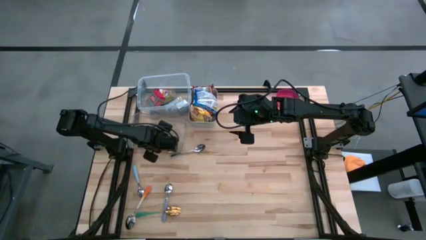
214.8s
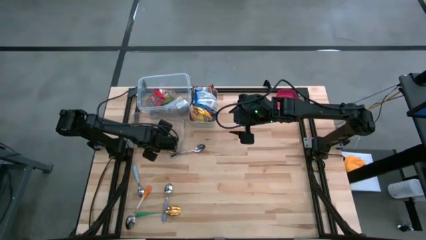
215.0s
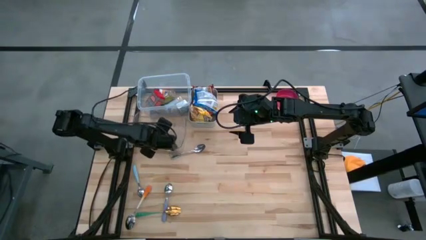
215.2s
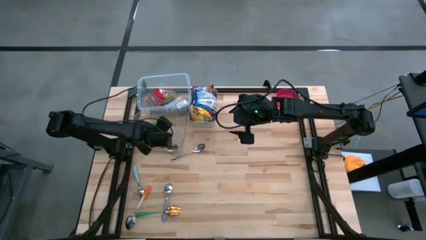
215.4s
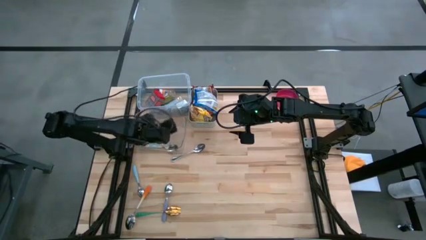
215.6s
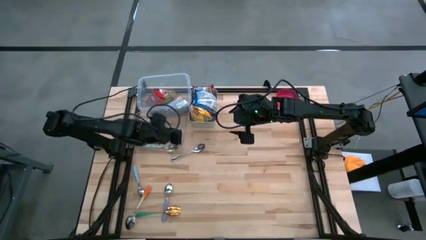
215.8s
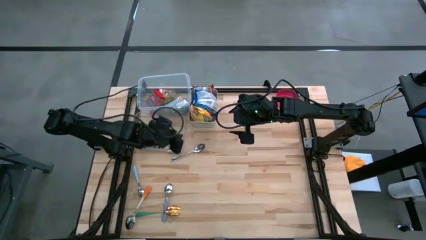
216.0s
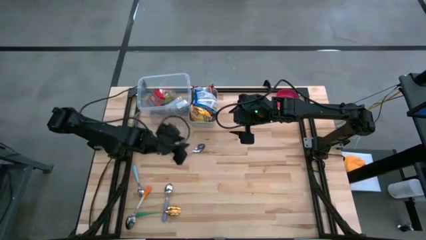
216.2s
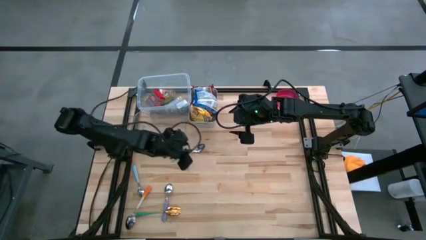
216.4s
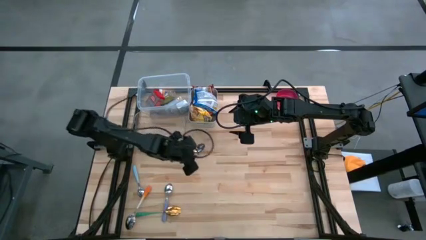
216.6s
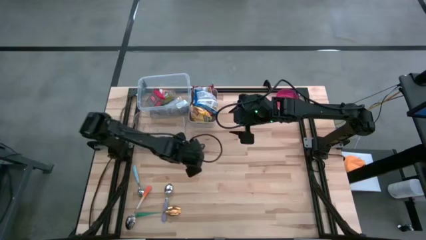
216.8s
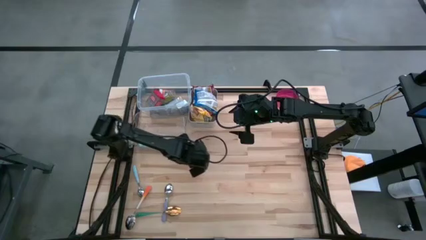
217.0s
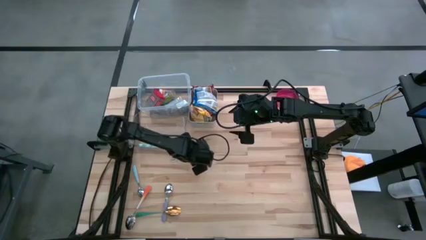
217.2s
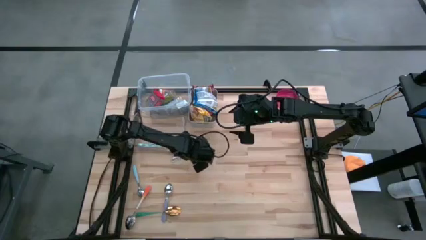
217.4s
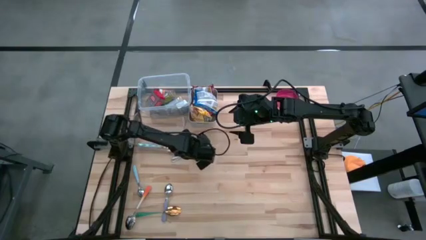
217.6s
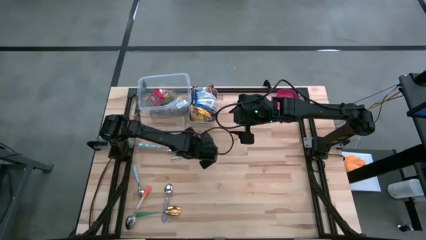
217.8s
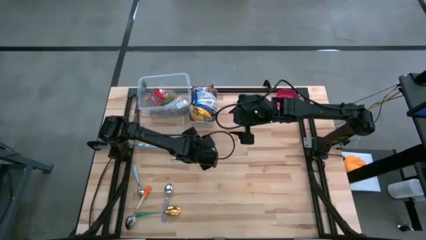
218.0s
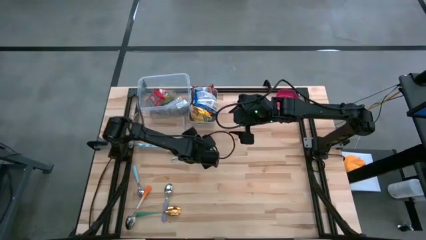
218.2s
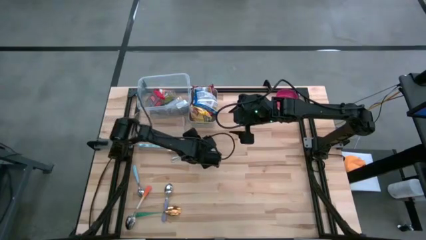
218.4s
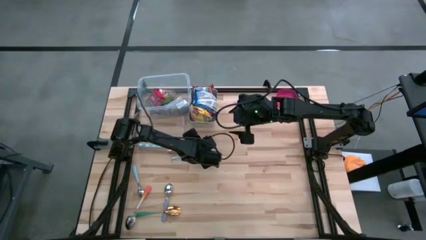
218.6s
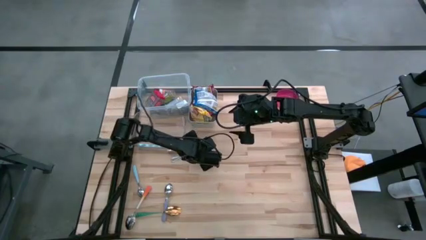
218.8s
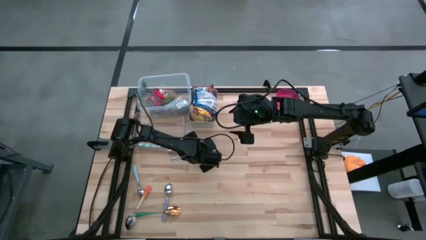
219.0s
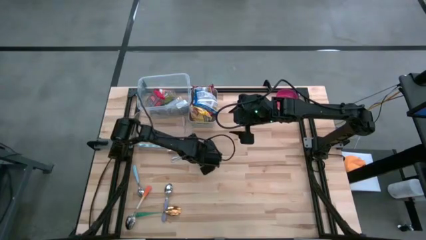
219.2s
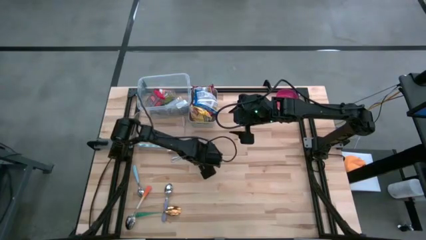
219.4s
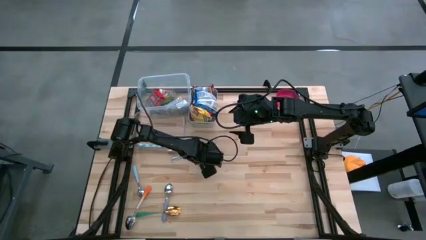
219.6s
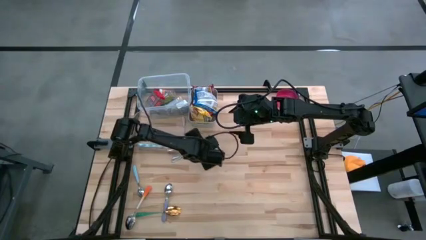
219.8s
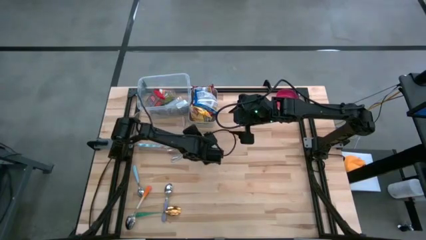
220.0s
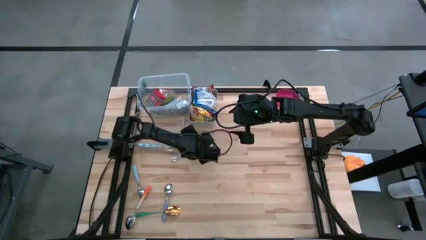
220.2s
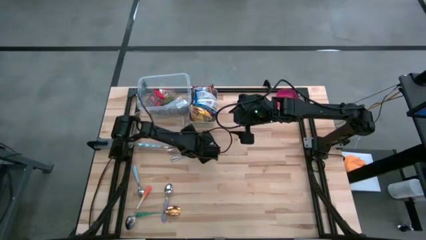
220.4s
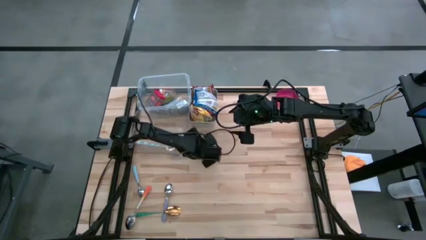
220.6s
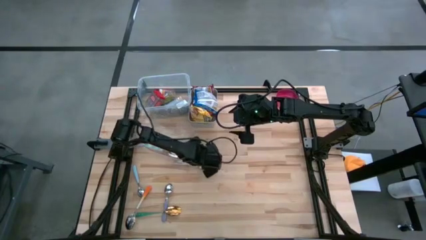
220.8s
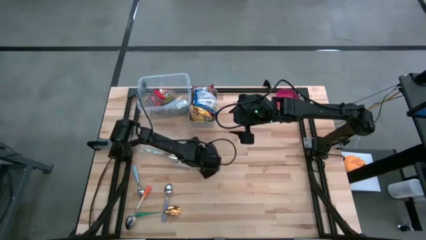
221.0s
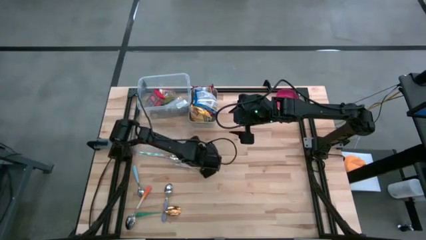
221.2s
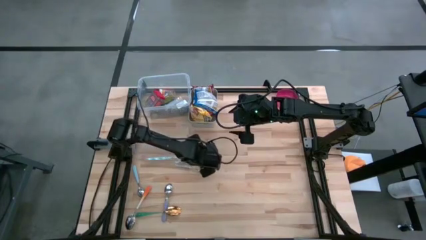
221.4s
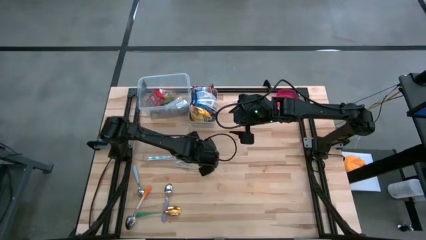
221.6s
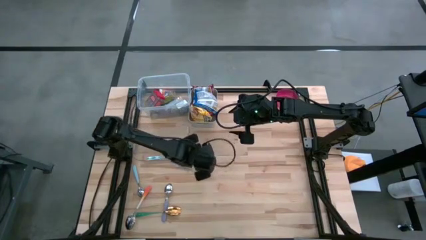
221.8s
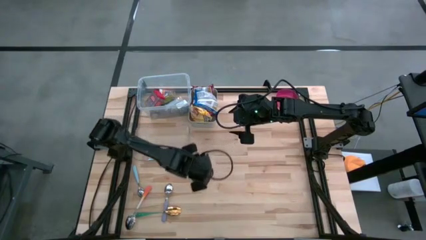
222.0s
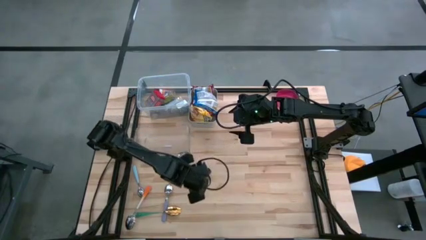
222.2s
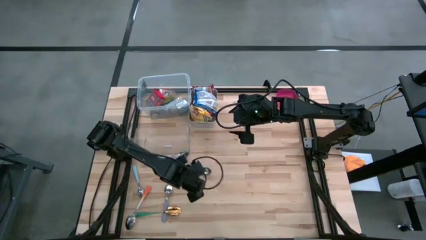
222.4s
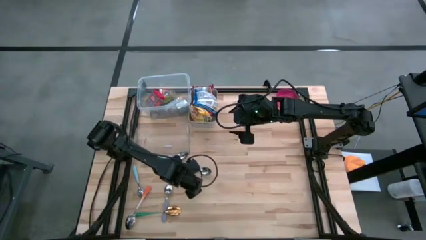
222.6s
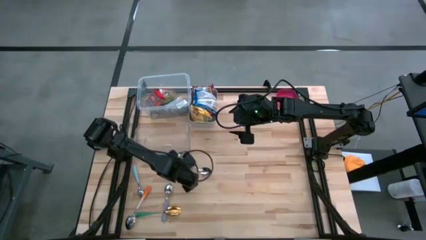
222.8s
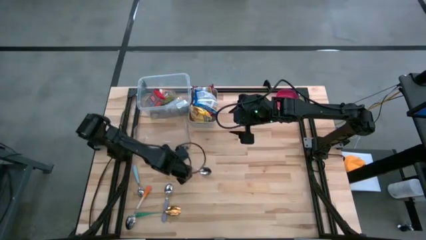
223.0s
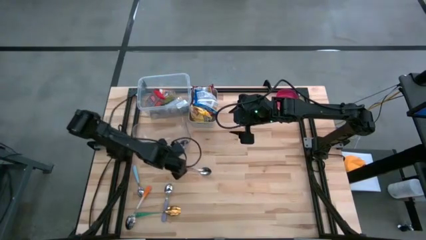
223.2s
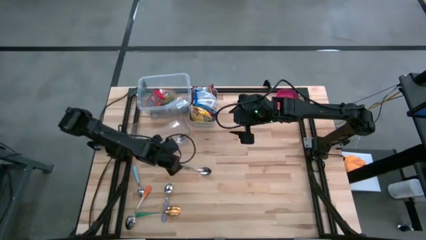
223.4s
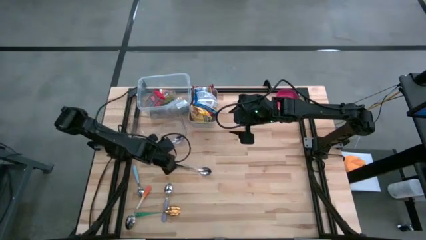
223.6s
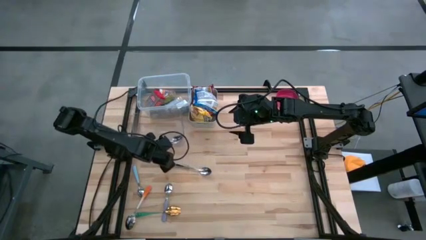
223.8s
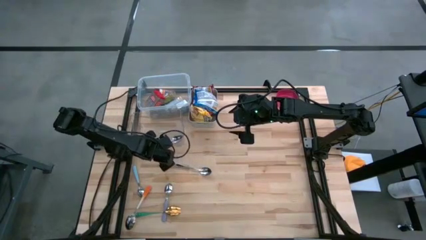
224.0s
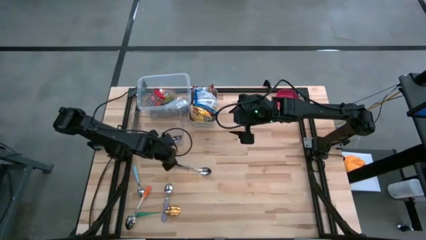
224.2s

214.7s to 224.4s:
Adjust the transparent bin

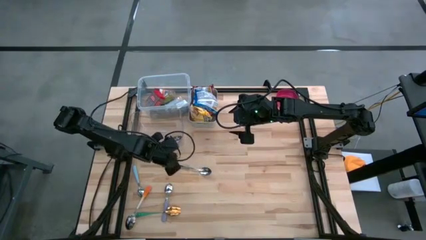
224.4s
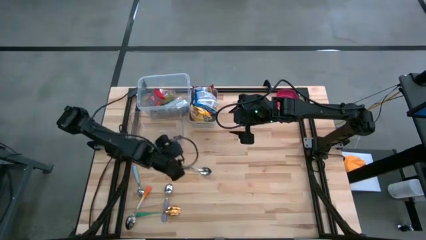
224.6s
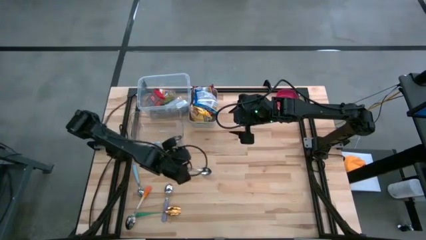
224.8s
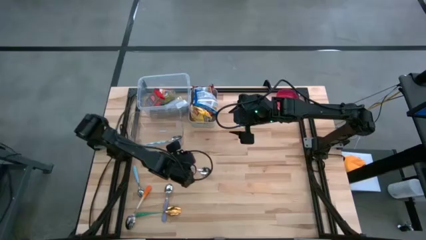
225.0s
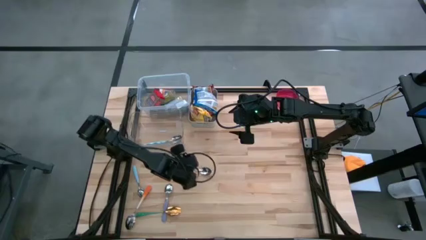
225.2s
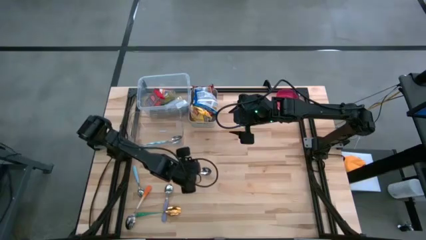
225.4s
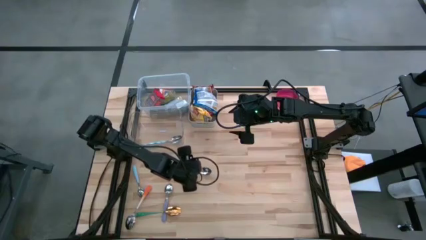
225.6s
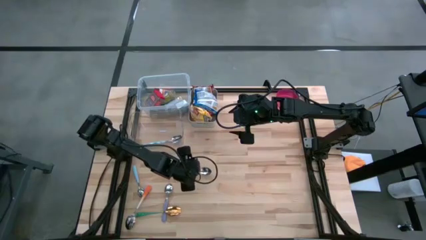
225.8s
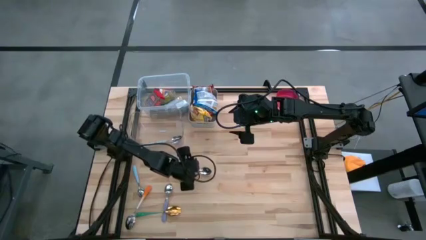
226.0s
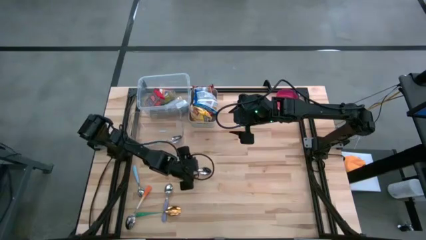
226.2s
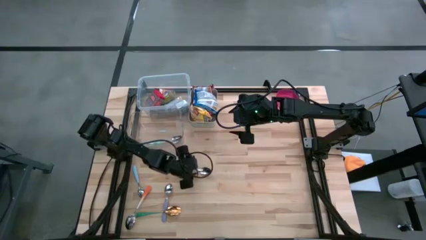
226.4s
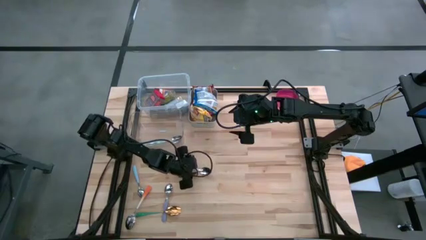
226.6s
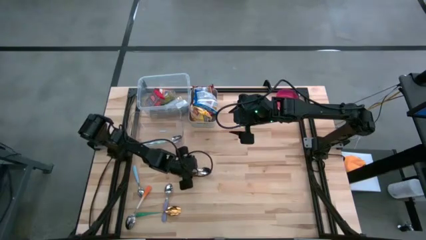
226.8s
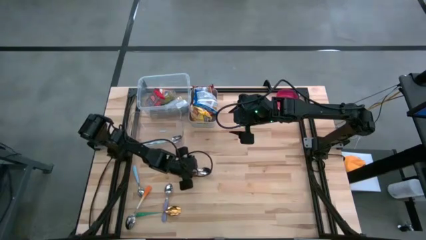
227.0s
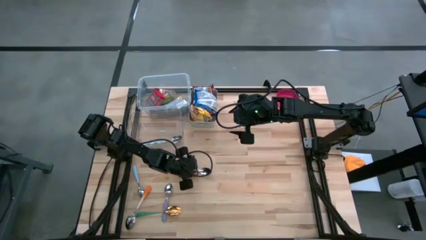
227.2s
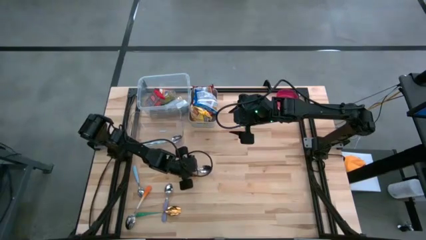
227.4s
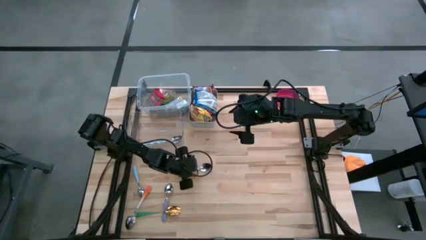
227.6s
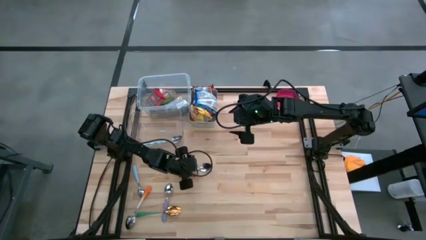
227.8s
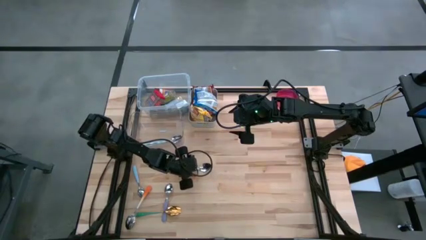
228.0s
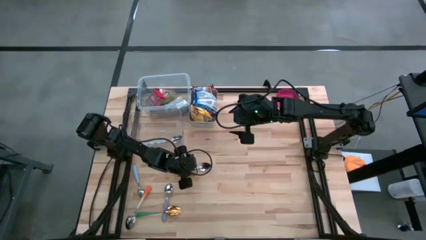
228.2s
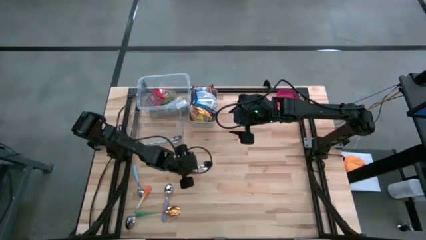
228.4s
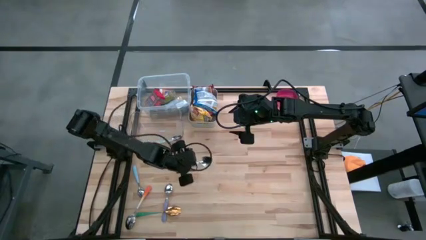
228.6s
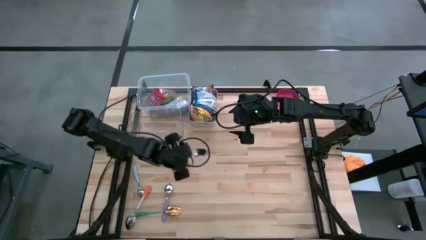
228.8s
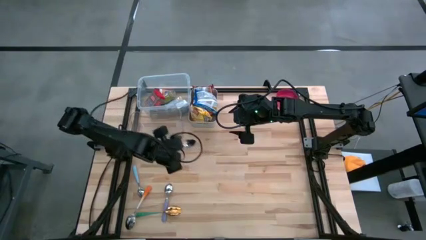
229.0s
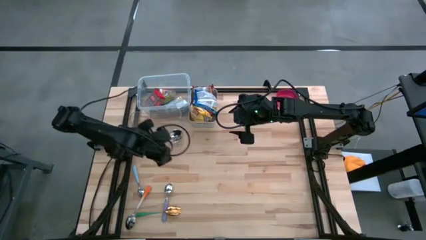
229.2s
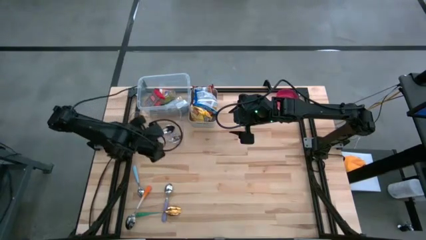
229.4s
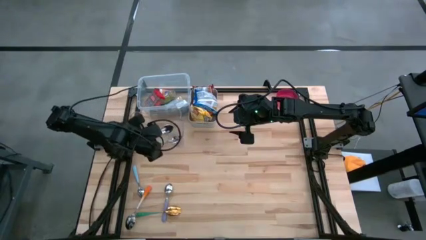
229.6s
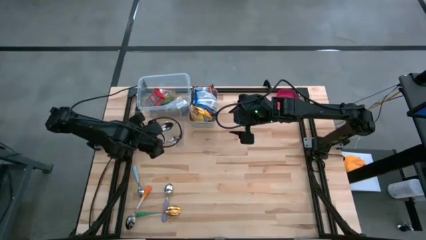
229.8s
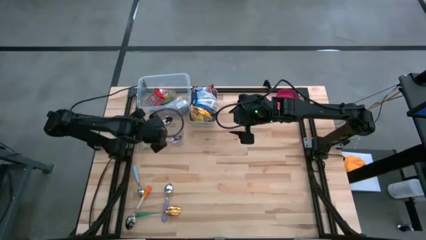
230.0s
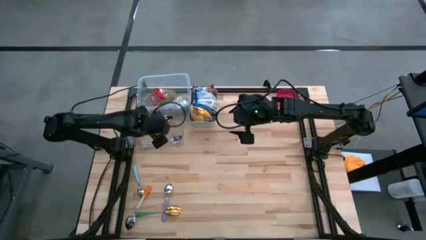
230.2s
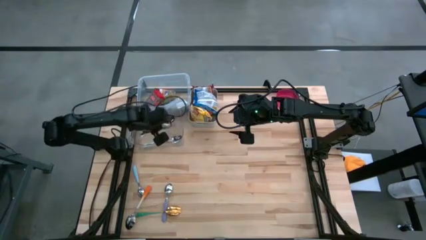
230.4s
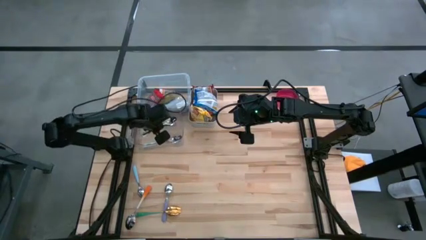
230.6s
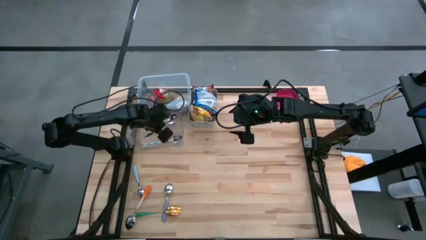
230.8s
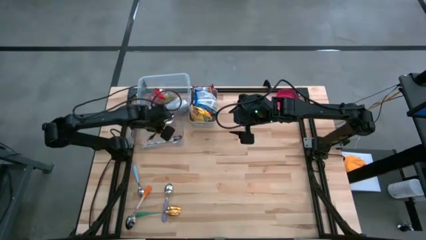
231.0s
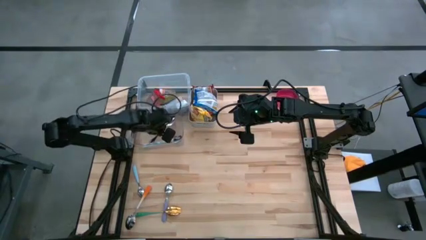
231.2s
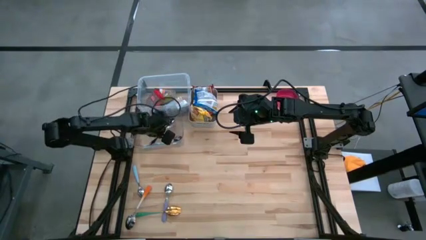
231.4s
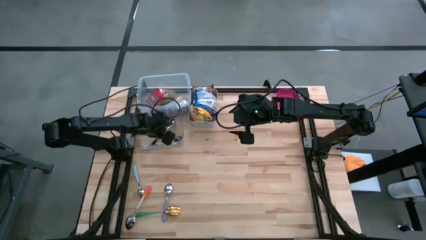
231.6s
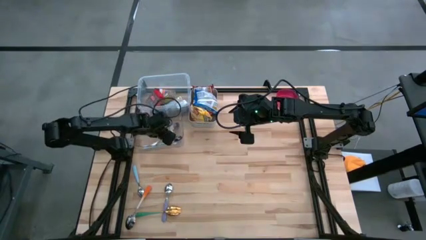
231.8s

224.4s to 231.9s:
Put the silver spoon into the transparent bin
